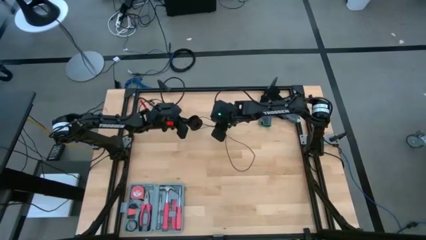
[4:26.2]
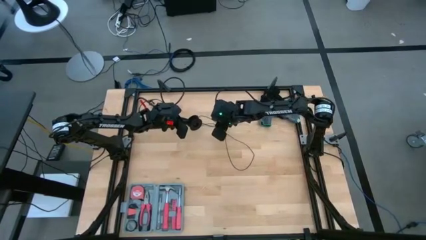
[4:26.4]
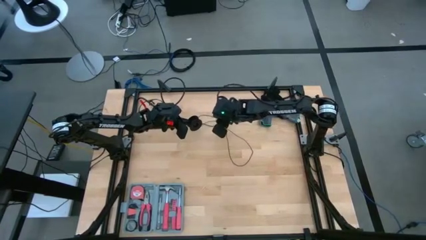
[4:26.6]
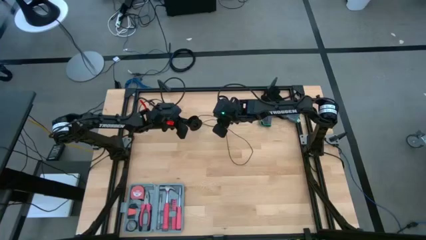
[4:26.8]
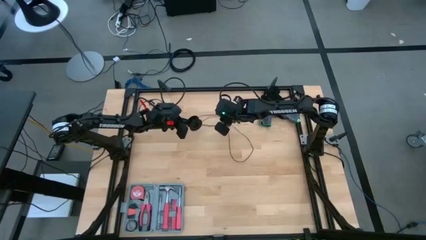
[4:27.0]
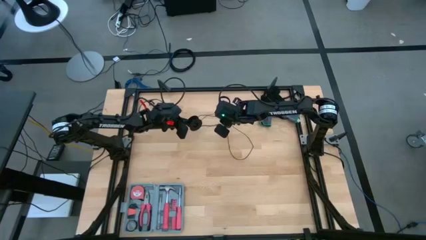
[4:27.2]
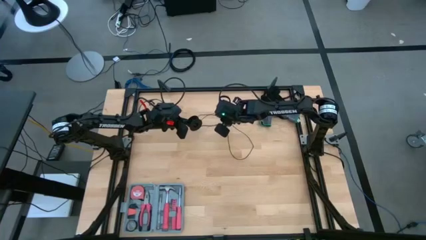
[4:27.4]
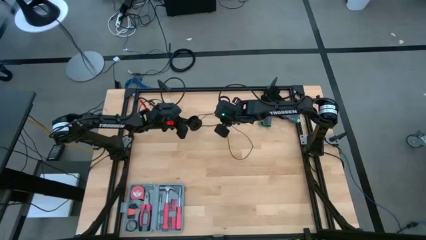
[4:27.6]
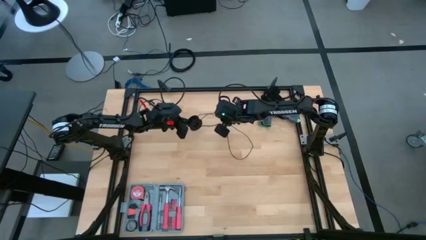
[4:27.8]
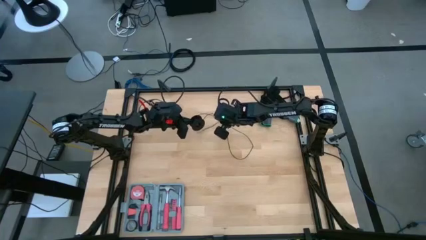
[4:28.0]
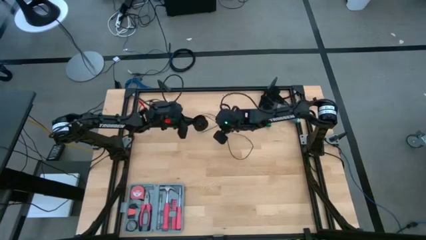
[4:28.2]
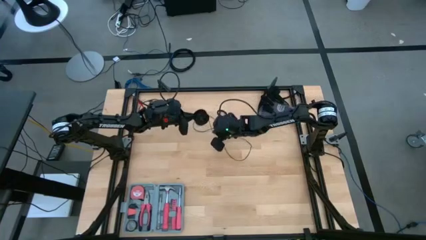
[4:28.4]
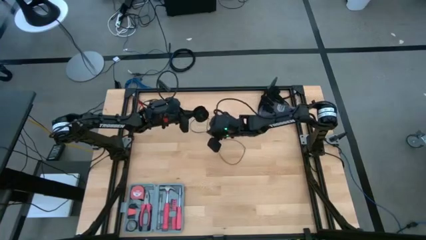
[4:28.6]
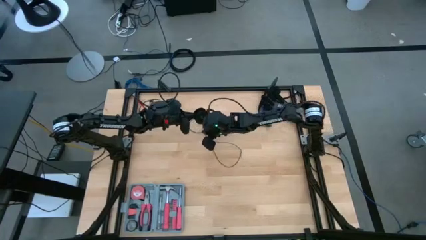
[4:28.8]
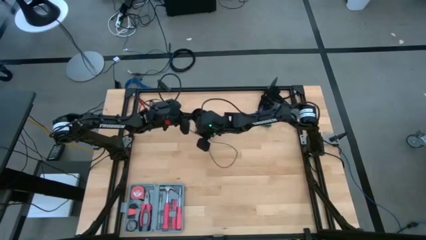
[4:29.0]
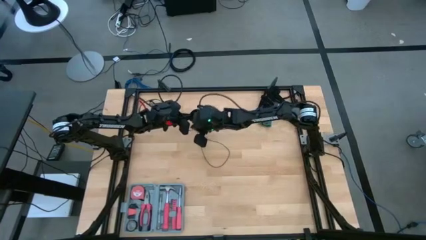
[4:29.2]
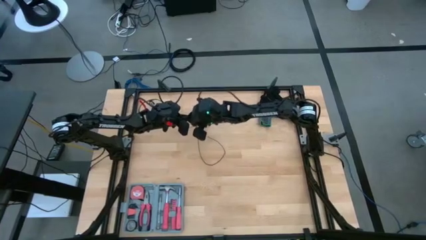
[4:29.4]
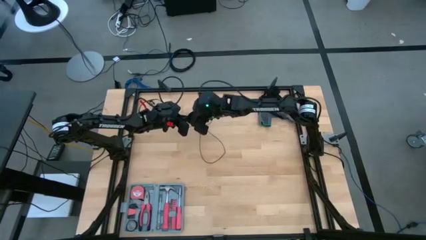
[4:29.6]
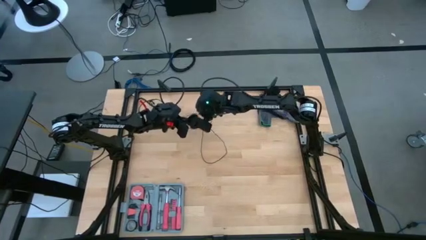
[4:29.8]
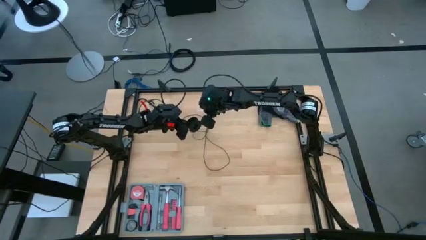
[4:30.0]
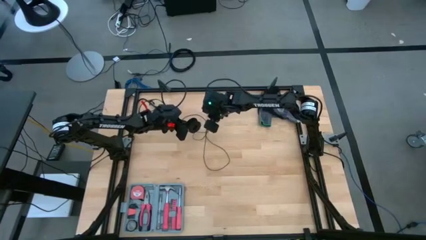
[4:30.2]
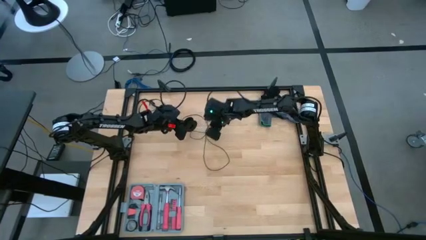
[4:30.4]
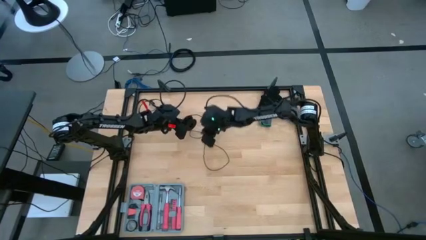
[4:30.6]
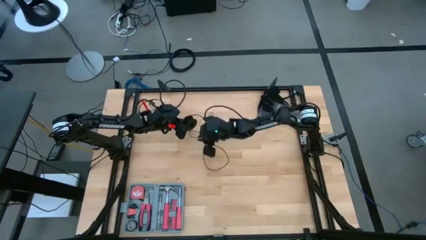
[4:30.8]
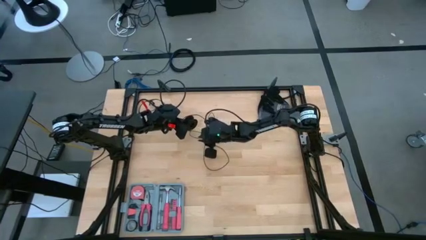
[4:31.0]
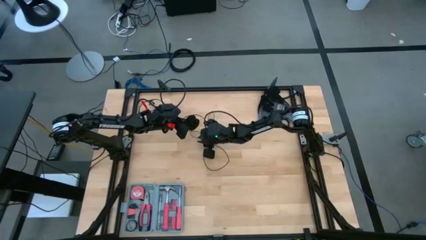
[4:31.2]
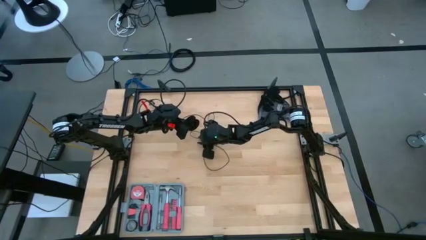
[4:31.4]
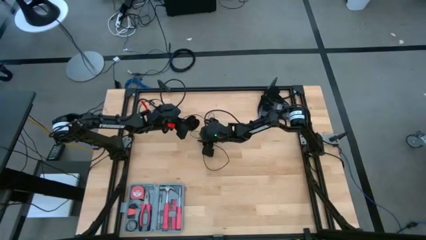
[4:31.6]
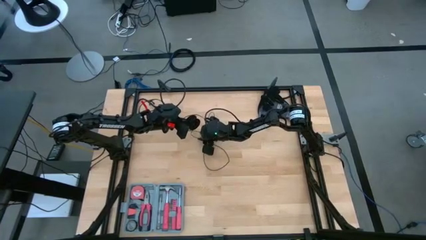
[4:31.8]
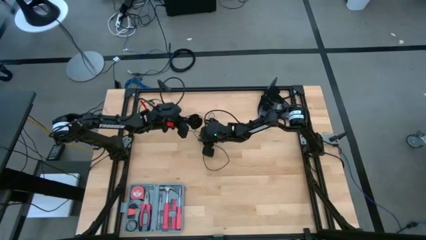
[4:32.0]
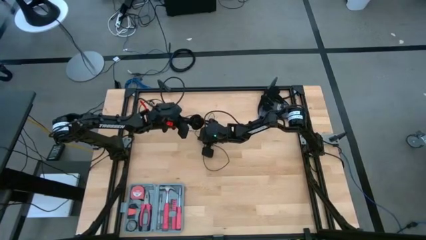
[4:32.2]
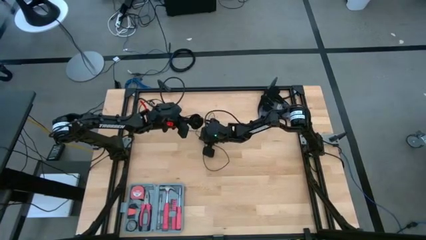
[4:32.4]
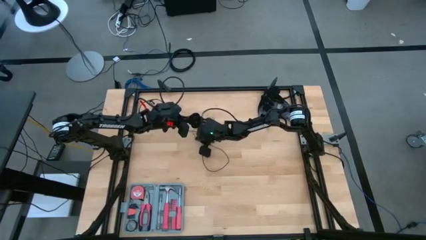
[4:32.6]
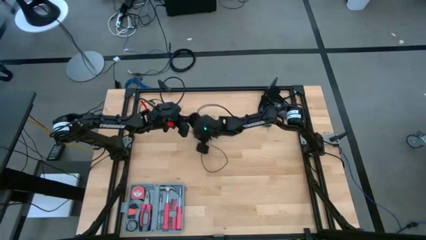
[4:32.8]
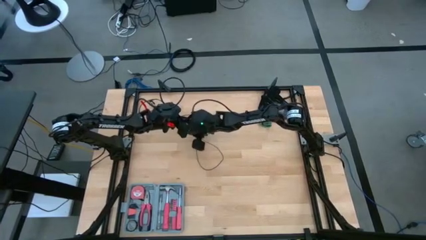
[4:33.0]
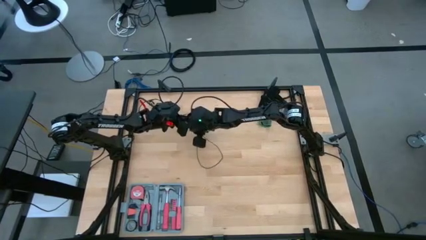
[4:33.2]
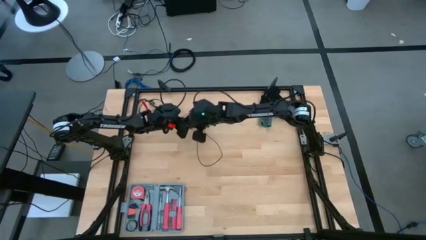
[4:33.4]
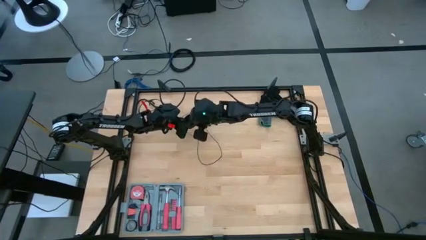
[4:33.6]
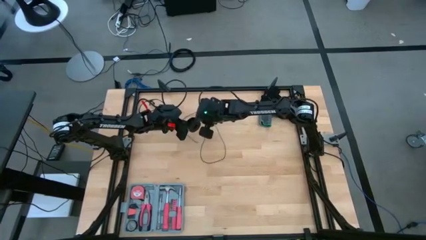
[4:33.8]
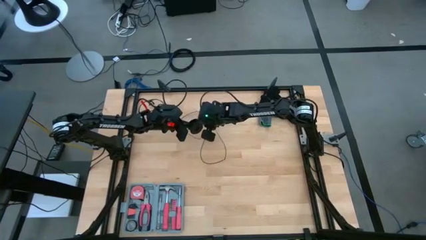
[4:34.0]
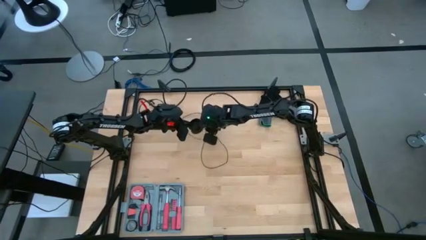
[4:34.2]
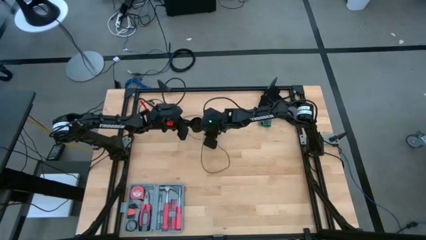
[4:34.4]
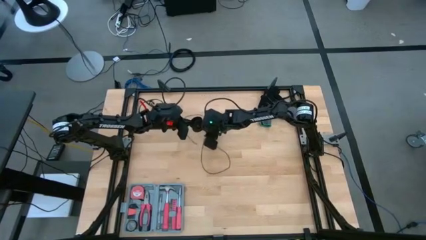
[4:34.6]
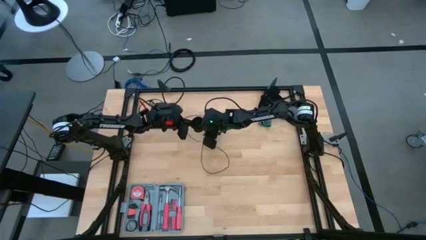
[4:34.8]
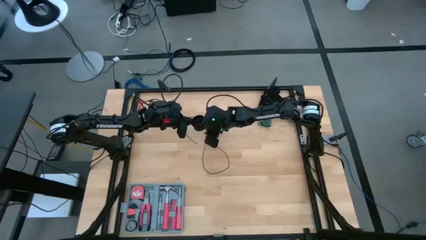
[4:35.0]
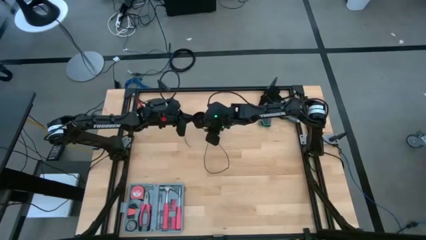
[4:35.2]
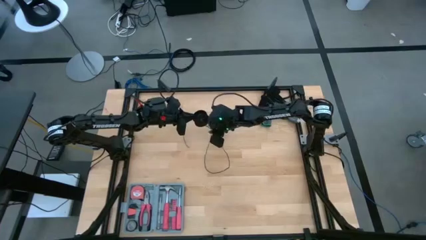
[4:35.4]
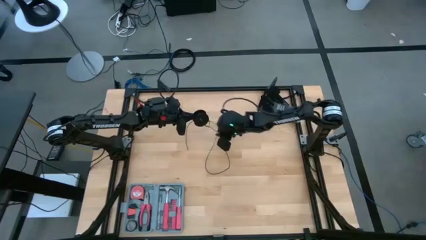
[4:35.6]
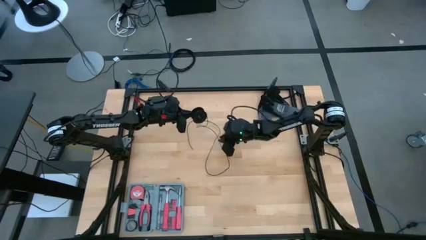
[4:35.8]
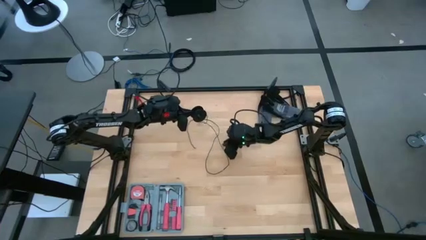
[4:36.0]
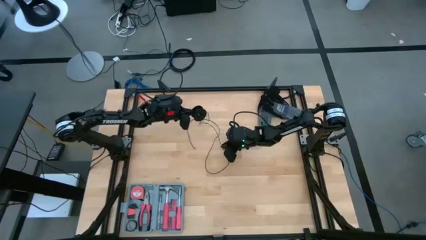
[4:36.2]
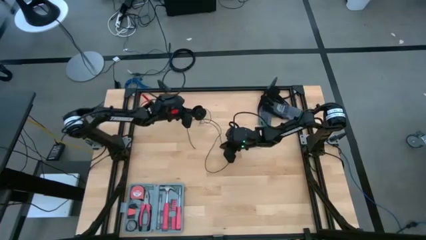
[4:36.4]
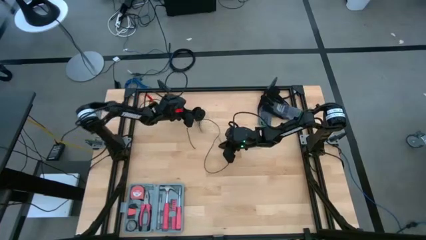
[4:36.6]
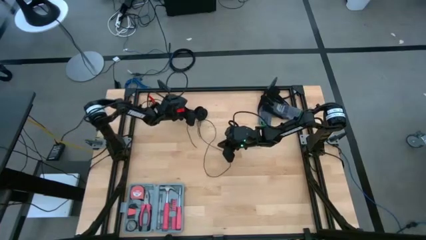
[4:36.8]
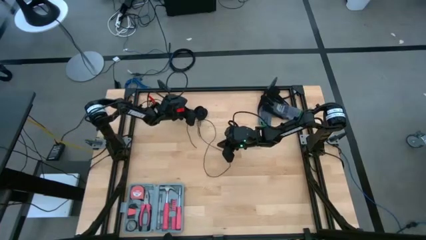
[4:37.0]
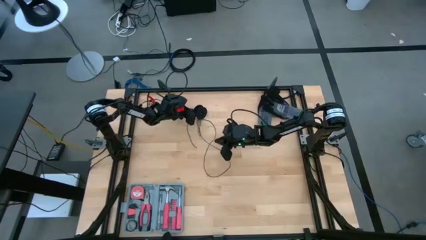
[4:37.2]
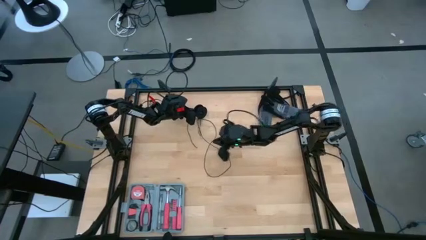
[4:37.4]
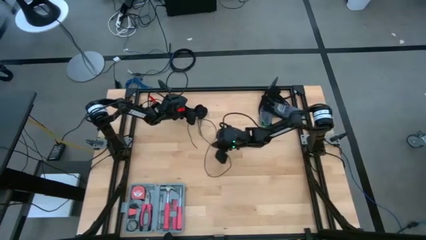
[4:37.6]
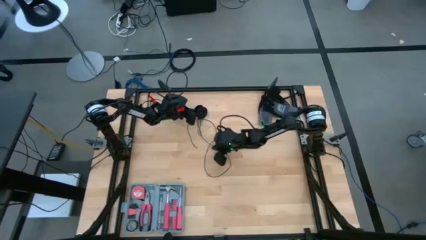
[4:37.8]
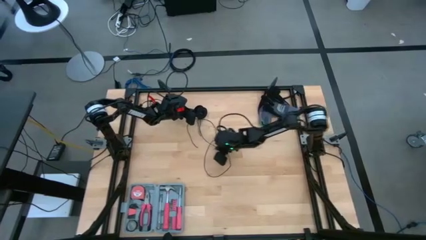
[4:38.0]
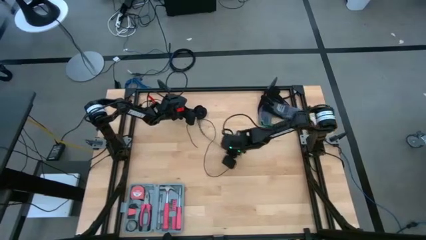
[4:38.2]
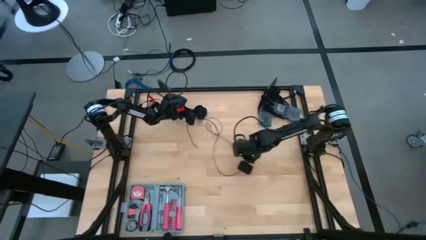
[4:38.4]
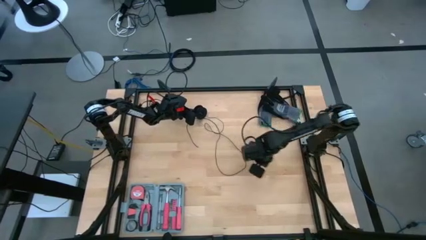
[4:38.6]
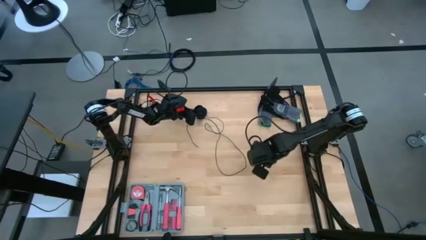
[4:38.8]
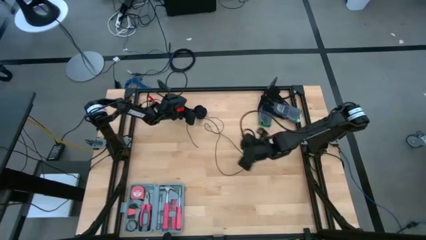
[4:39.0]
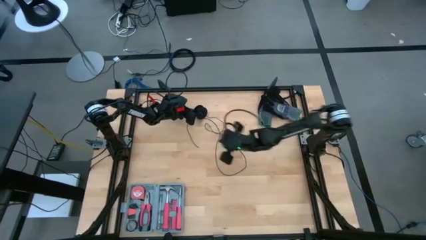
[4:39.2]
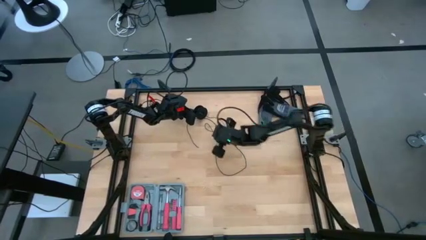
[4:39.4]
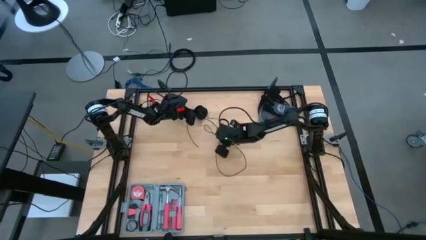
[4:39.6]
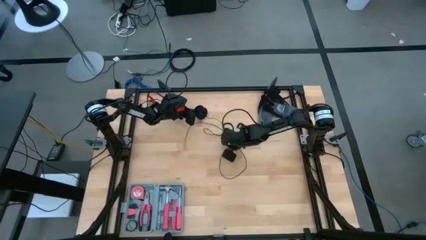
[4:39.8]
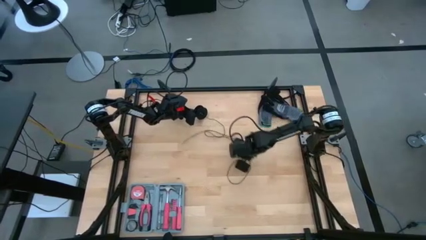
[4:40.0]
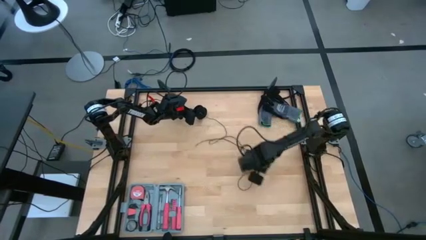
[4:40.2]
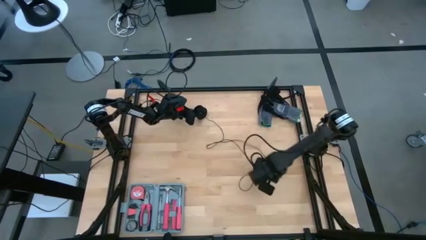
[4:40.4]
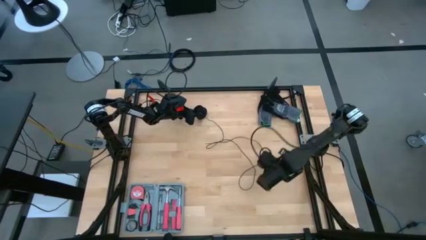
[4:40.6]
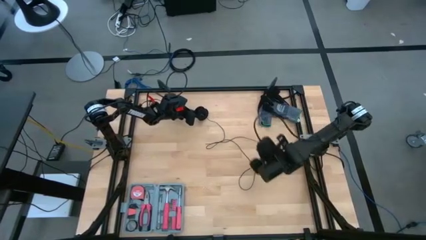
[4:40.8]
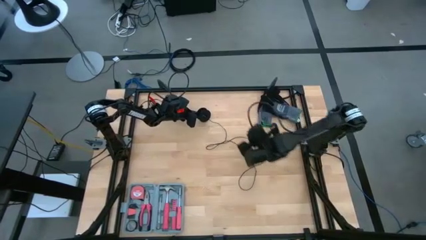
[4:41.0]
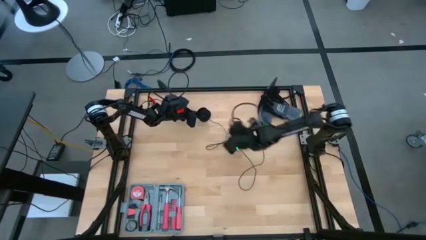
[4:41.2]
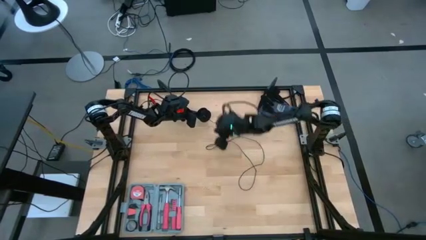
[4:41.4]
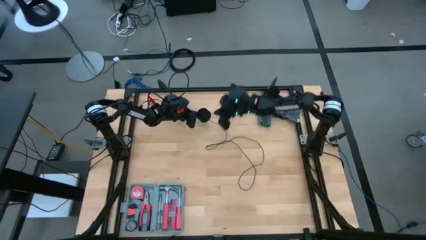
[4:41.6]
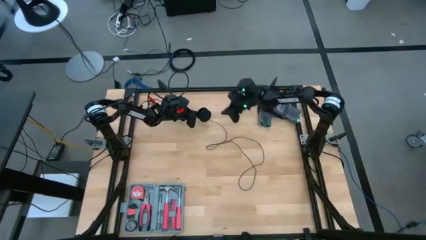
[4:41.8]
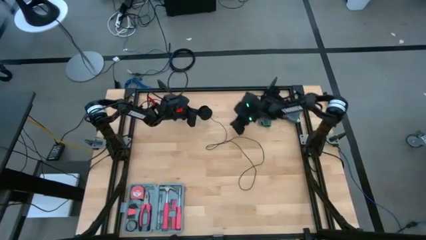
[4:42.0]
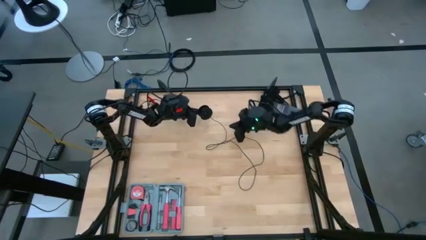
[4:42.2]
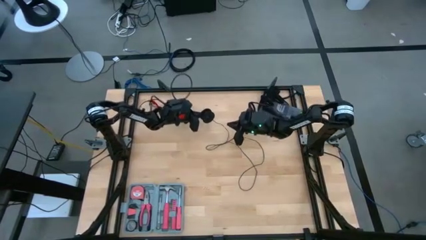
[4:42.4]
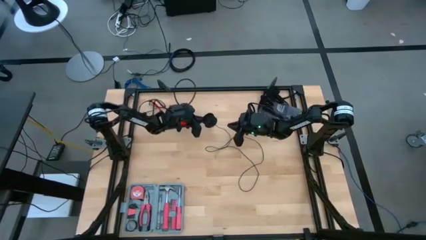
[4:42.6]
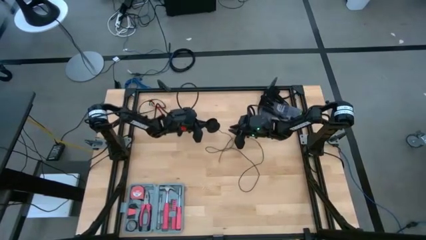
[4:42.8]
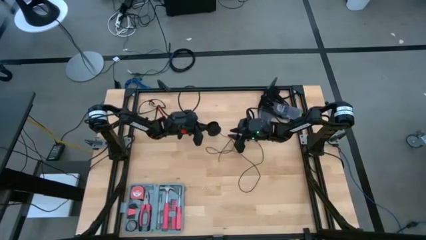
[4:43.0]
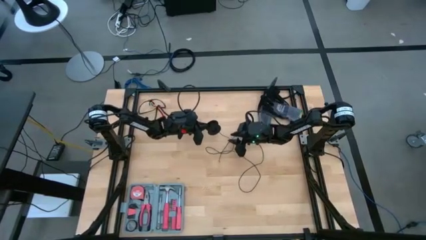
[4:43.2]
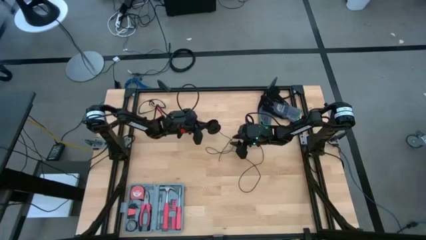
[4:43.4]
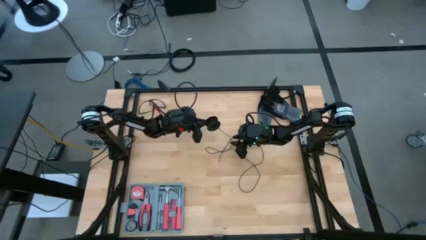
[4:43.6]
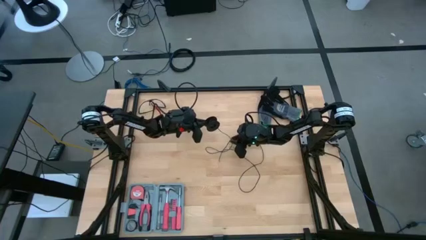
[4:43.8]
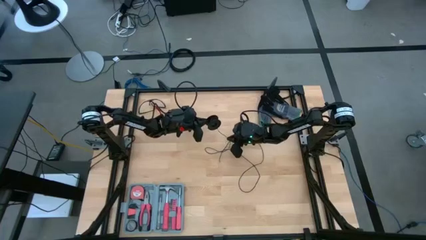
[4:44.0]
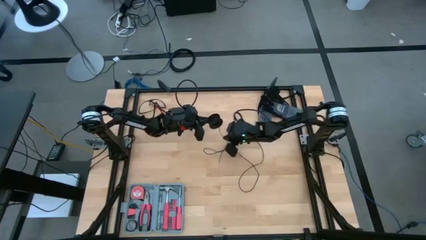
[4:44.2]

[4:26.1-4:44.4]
Task: Coil cords
Coil the black wire onto the black spool
